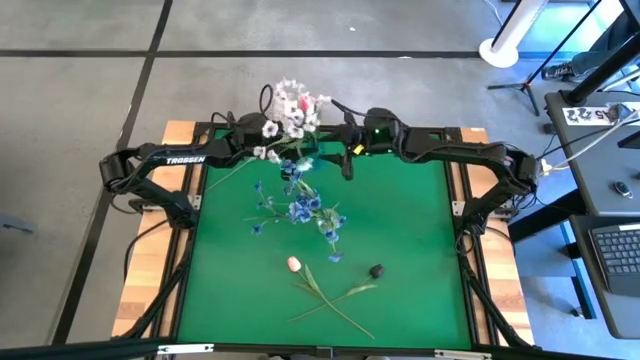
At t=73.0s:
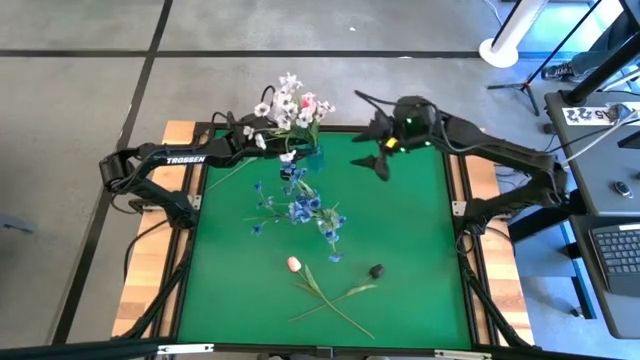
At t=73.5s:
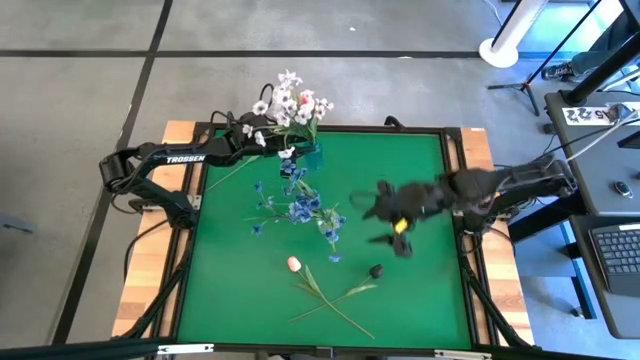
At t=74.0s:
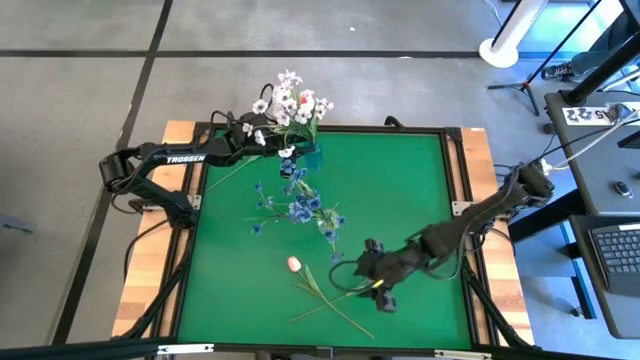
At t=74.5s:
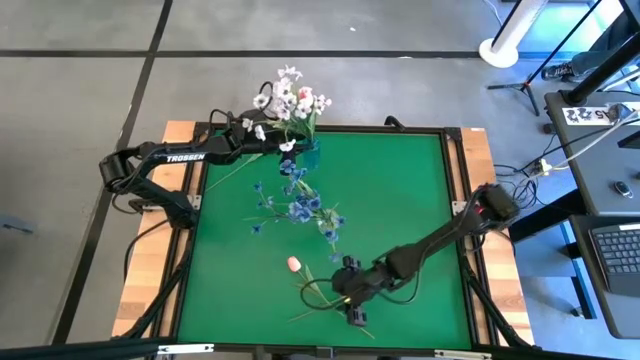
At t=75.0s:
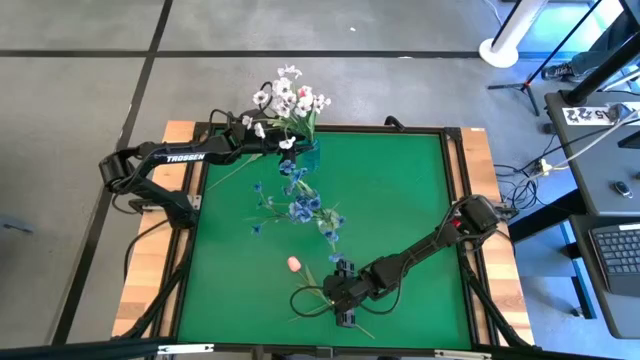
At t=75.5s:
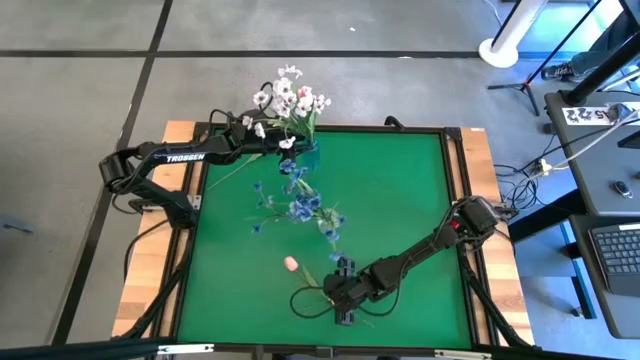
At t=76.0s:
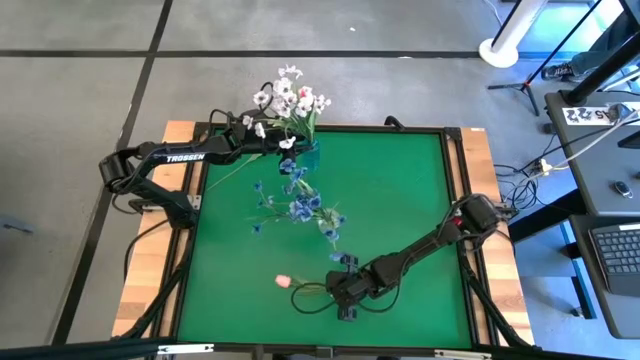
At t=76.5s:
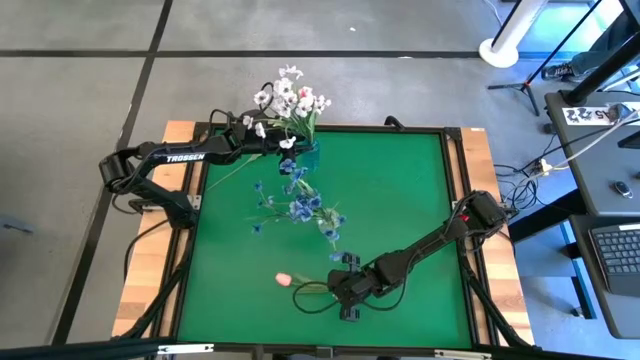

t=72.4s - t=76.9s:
Task: Sort flowers into vase by color
Put the pink flower into the blue vase

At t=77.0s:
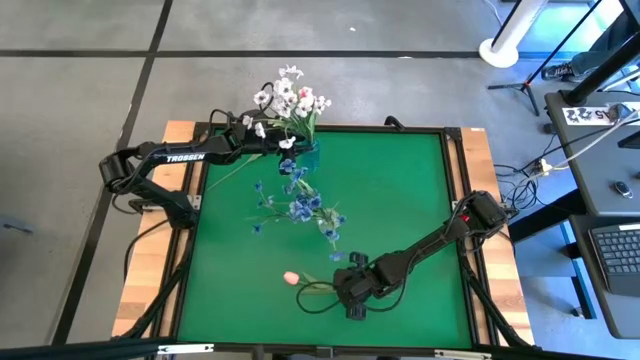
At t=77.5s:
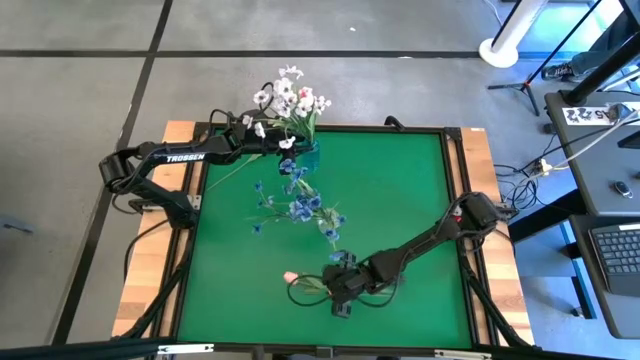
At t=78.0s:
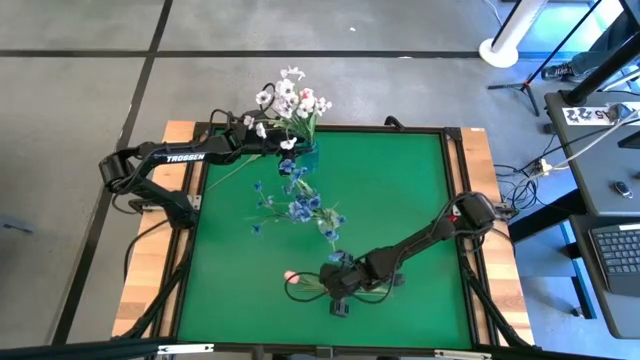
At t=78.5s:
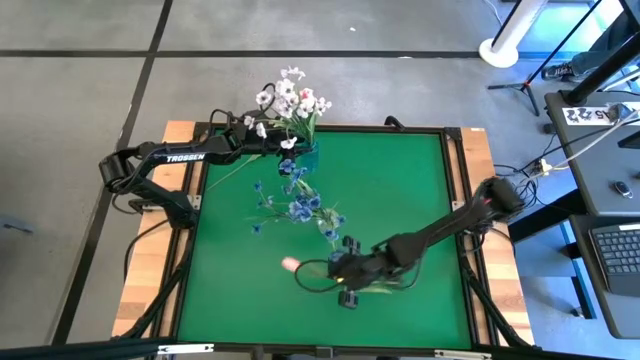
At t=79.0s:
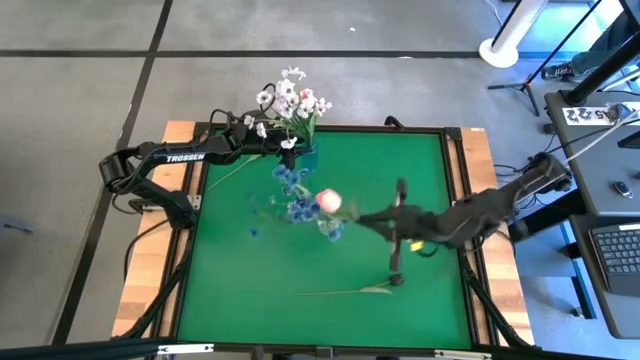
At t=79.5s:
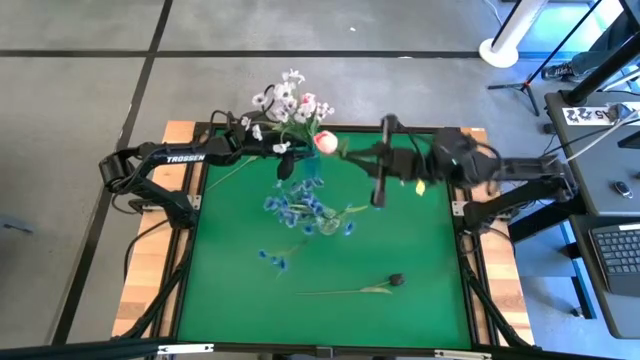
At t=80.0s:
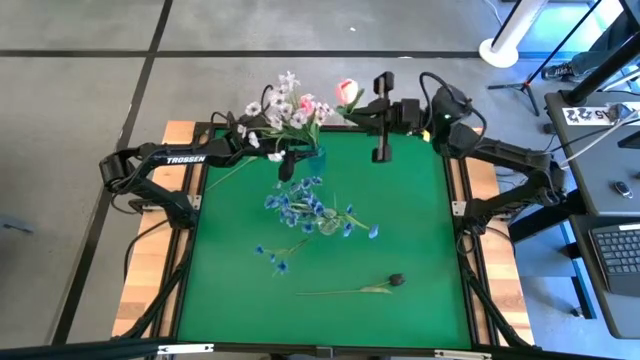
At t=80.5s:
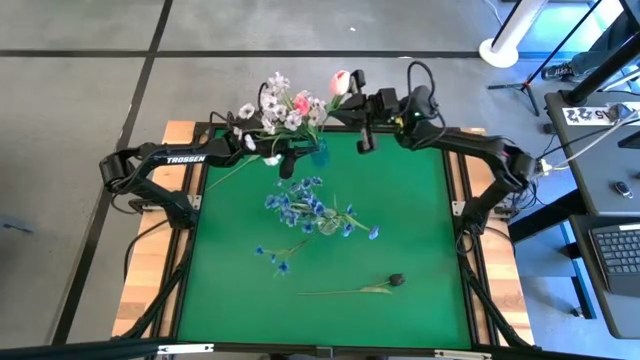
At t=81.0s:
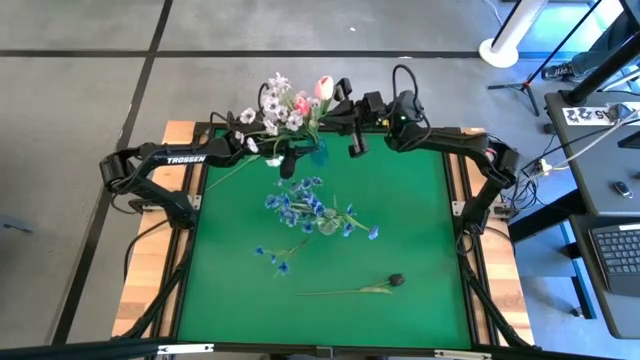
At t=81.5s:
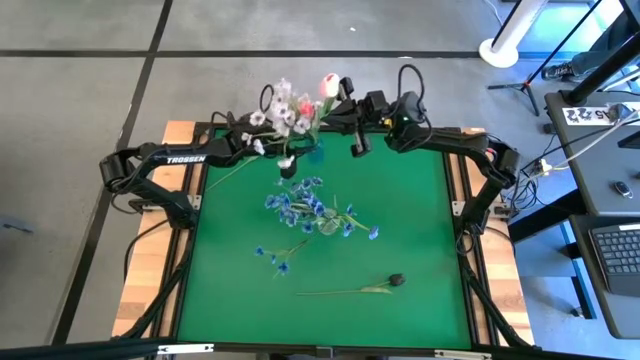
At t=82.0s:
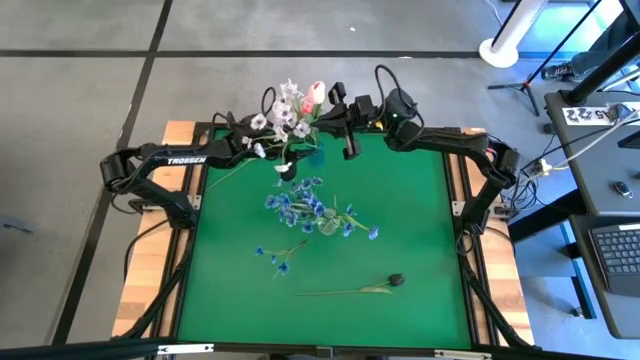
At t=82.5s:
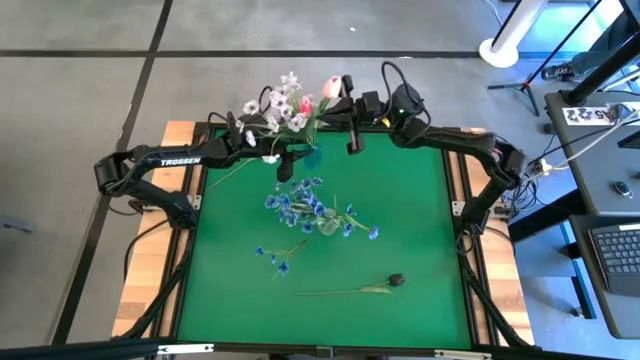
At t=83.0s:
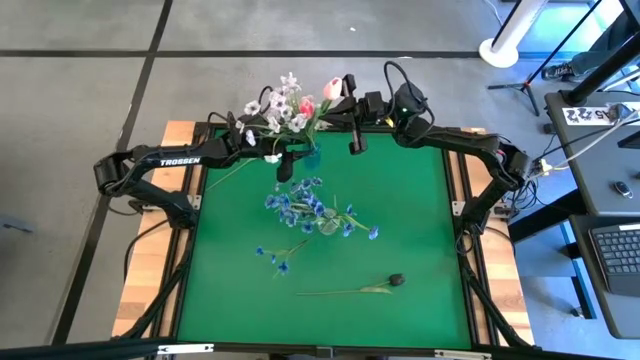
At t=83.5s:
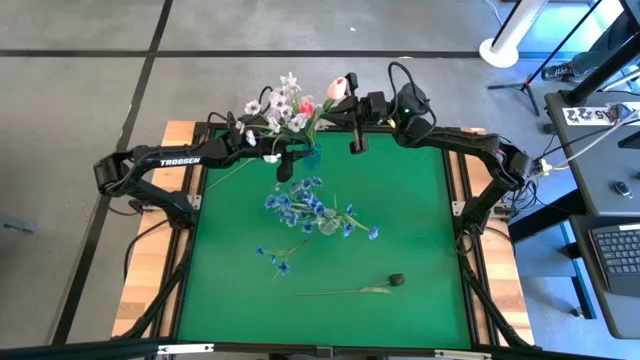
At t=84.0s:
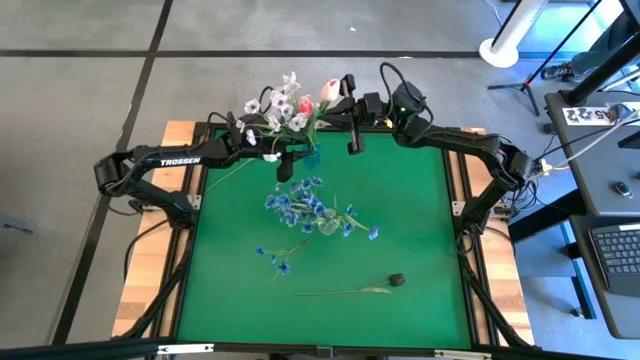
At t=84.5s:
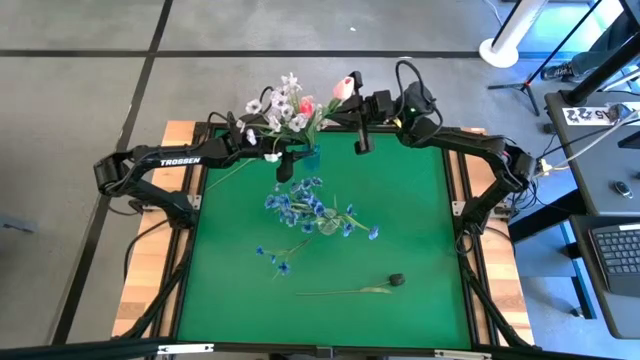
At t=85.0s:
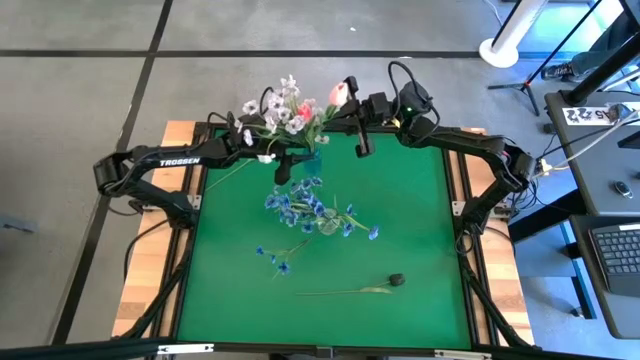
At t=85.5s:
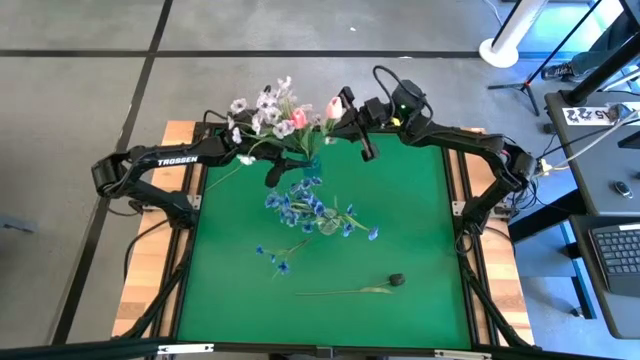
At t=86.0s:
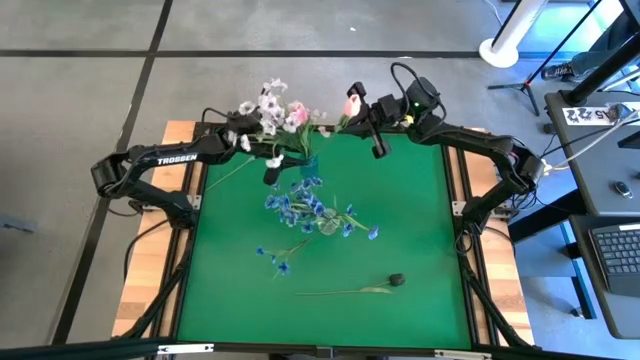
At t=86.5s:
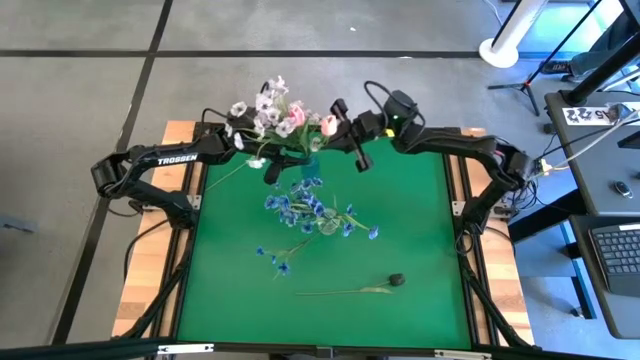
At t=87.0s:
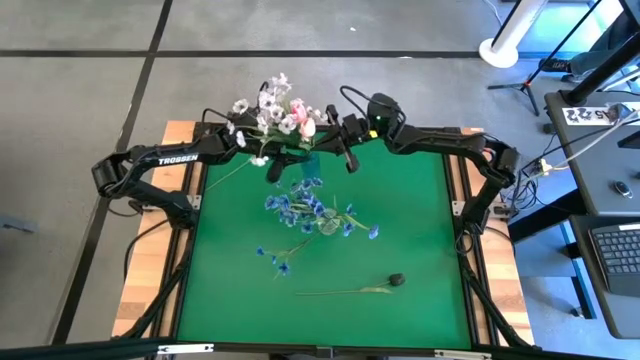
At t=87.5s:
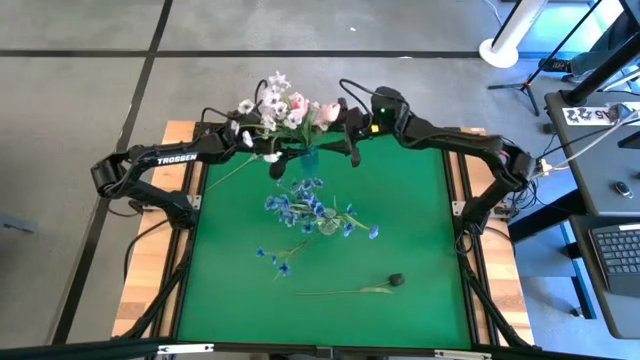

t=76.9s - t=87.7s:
Put the pink flower into the blue vase

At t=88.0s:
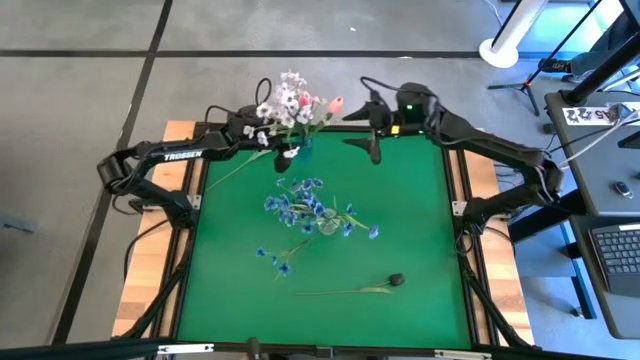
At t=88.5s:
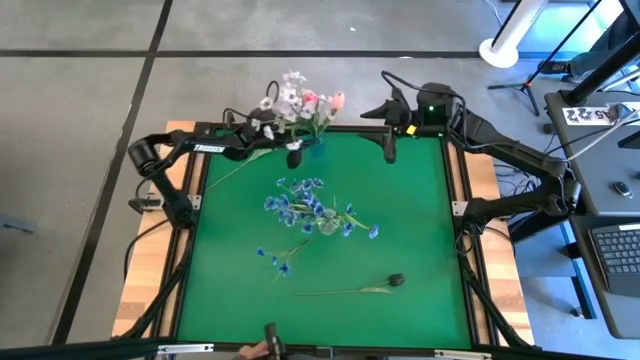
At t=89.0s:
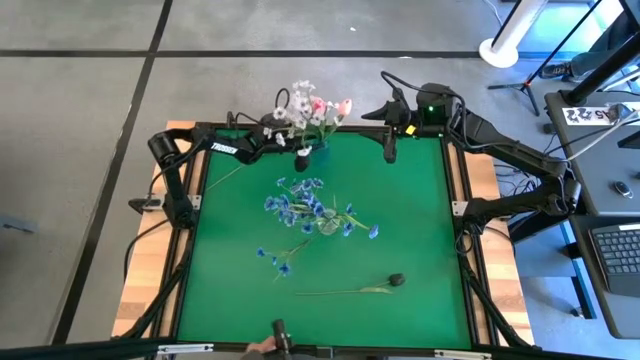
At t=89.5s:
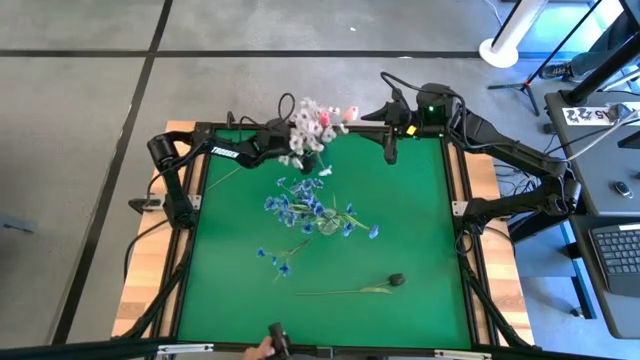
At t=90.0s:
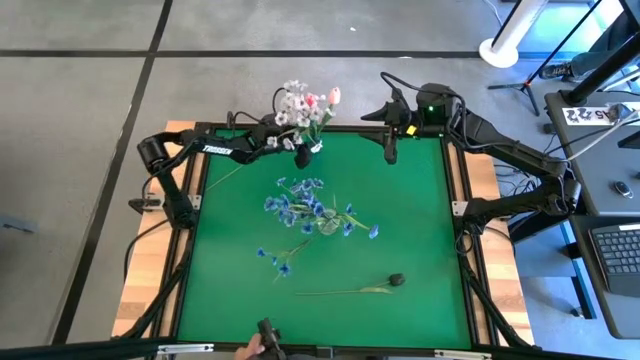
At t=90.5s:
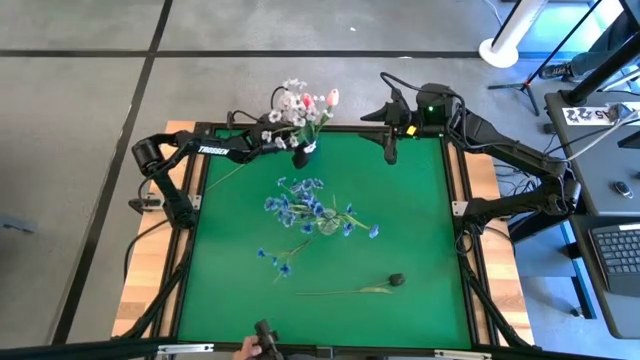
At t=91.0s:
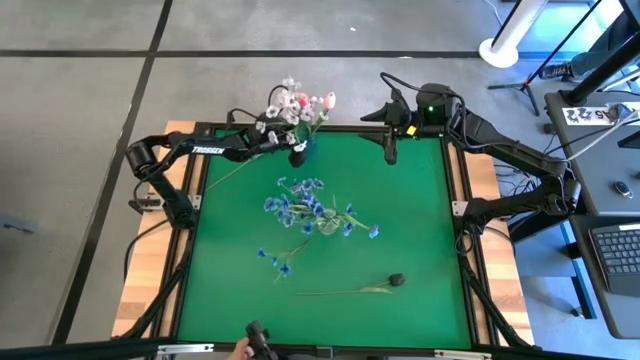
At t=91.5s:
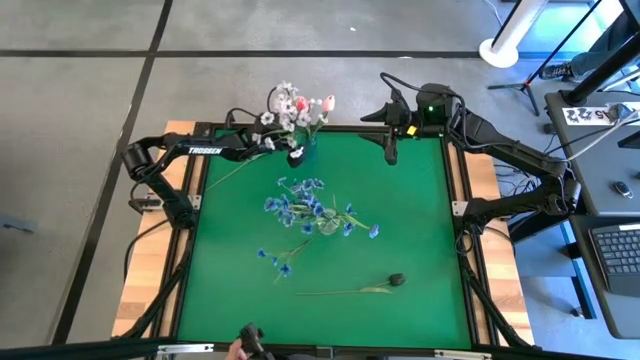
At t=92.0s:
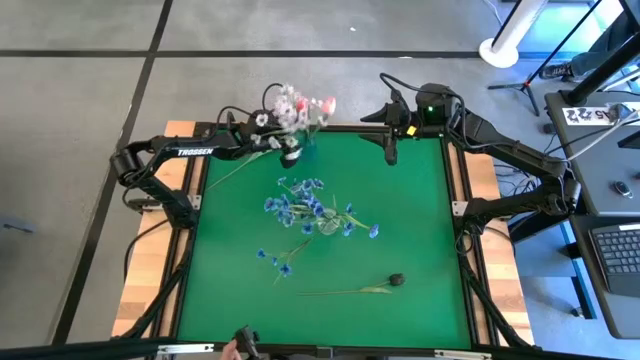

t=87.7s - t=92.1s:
Adjust the blue vase

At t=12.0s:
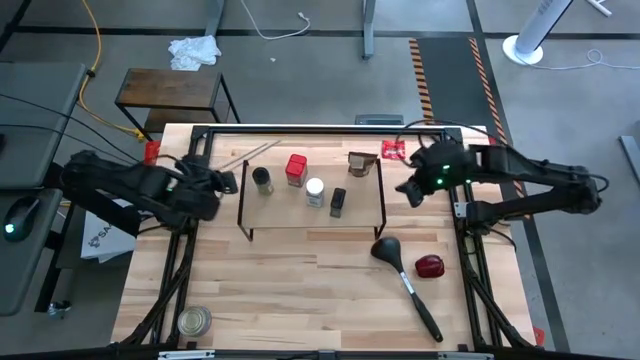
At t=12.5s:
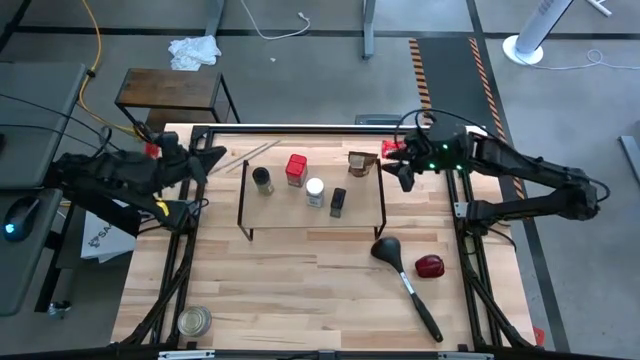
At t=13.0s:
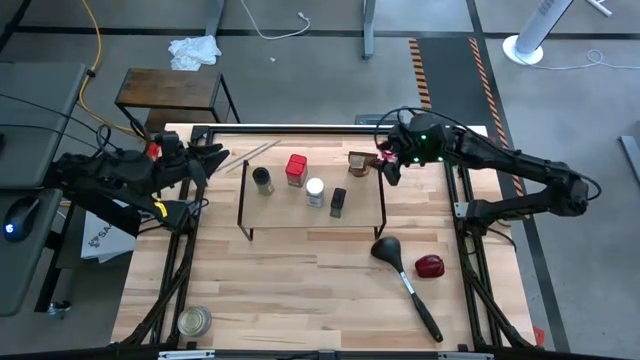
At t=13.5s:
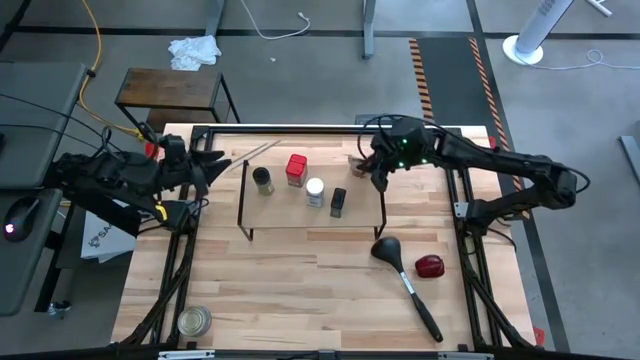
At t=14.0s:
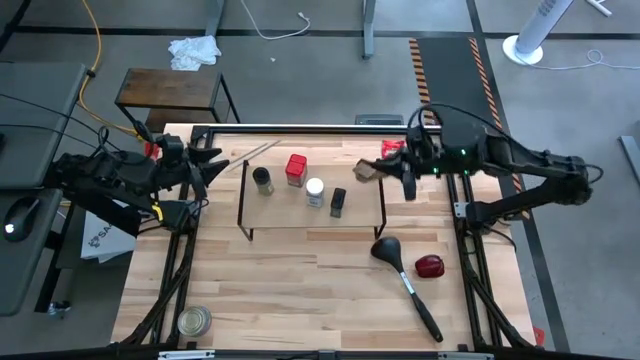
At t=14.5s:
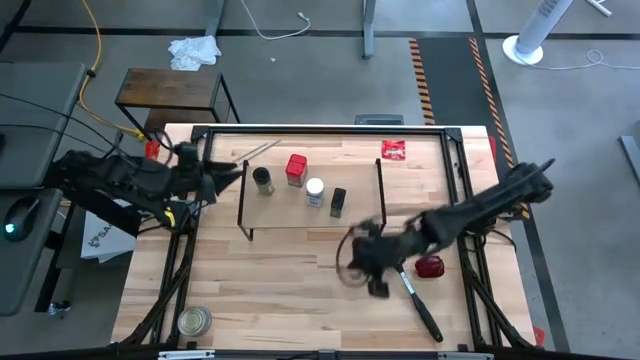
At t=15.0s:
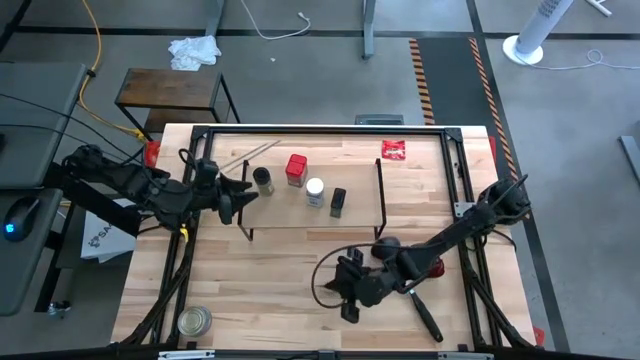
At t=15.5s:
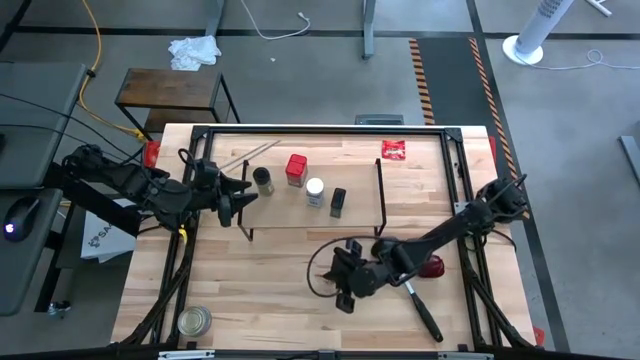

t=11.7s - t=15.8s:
Task: Shelf spices
Remove the orange seasoning pack from the shelf
